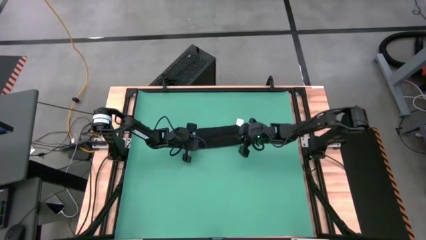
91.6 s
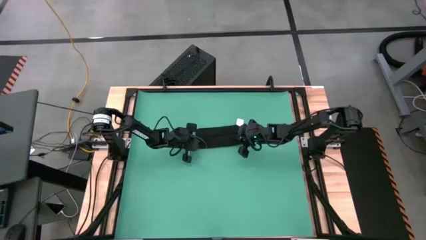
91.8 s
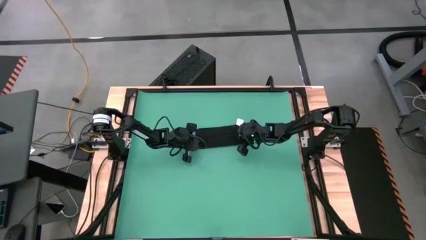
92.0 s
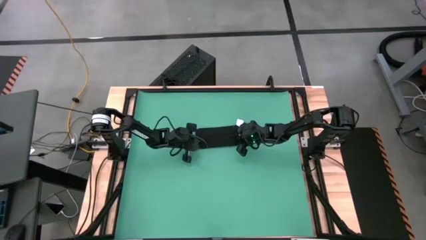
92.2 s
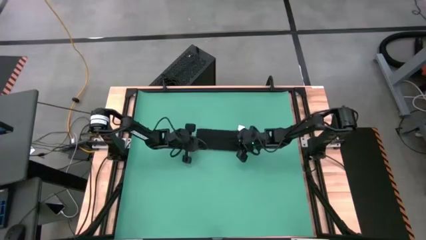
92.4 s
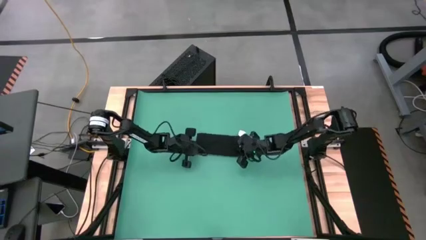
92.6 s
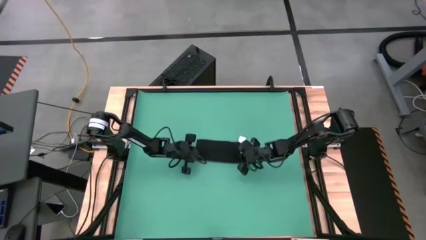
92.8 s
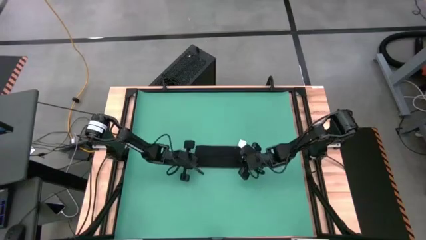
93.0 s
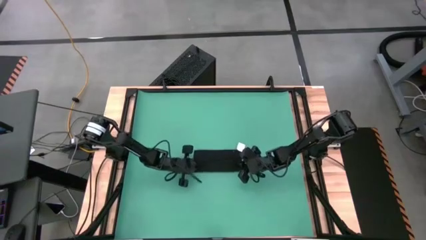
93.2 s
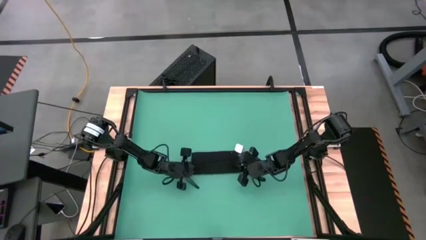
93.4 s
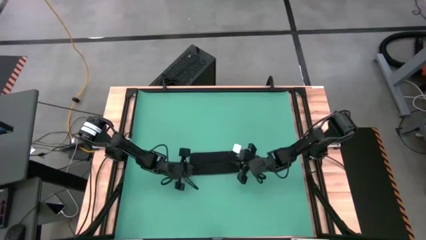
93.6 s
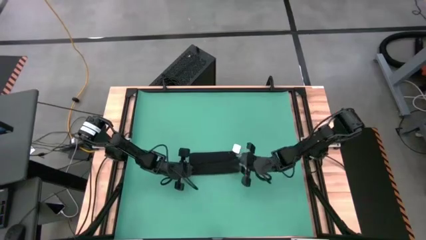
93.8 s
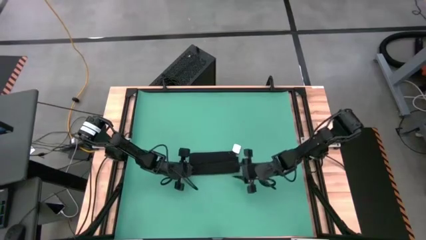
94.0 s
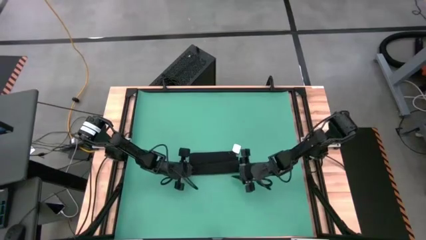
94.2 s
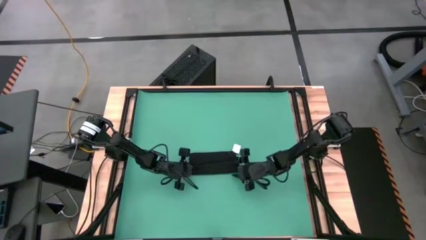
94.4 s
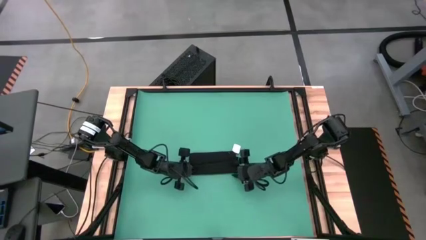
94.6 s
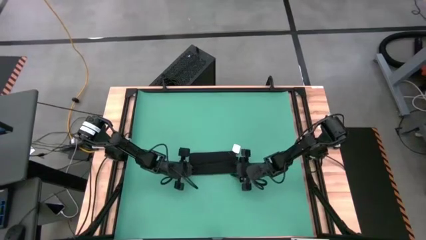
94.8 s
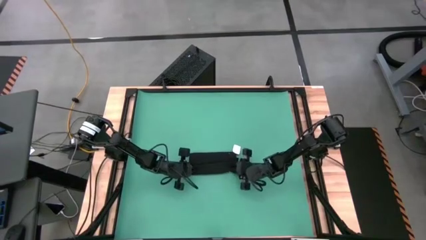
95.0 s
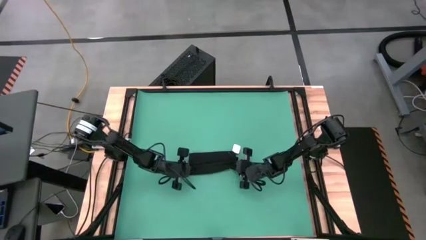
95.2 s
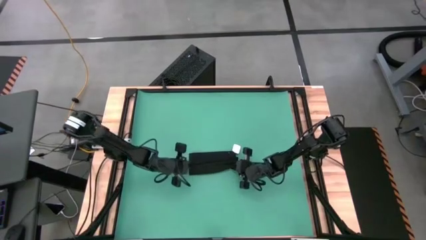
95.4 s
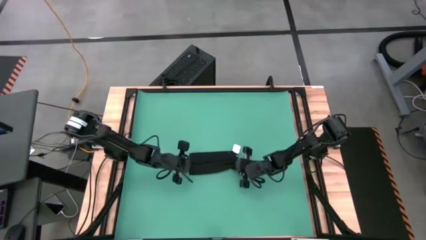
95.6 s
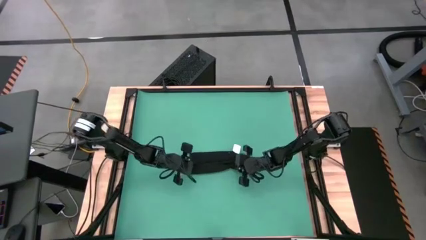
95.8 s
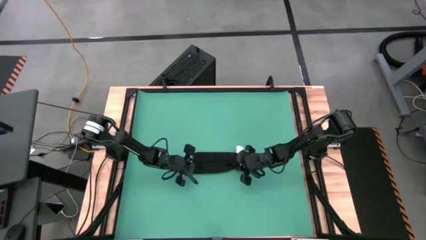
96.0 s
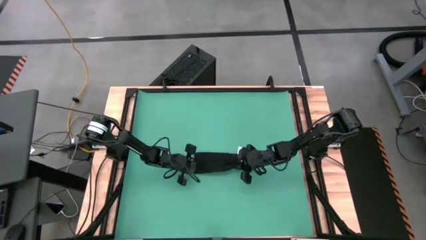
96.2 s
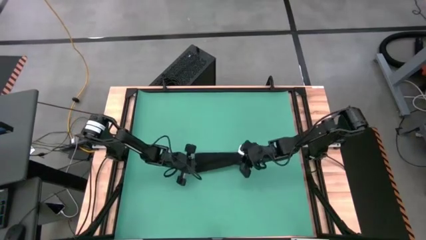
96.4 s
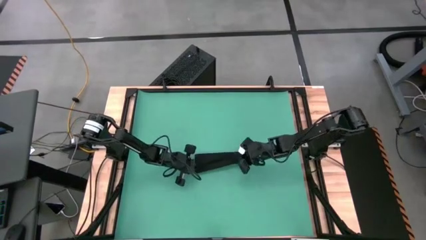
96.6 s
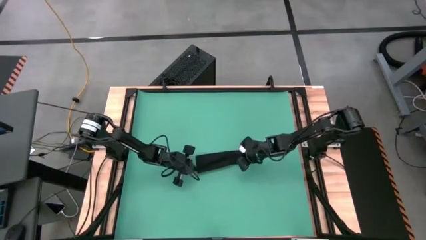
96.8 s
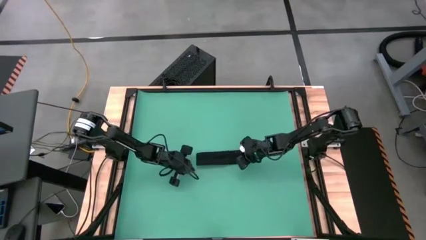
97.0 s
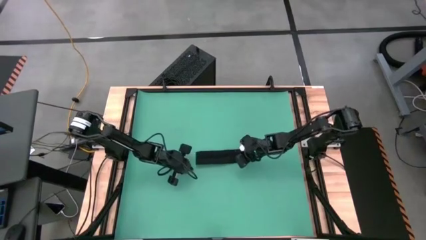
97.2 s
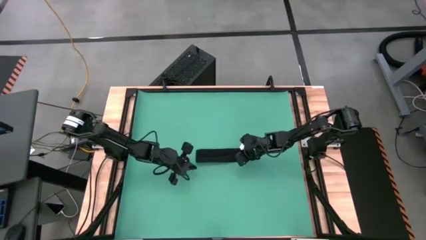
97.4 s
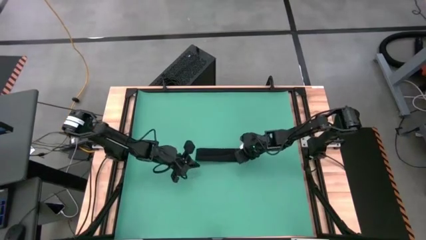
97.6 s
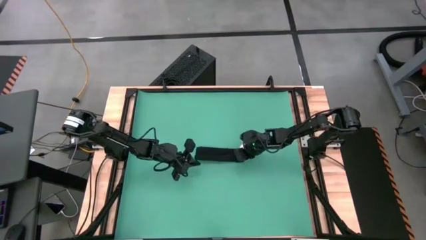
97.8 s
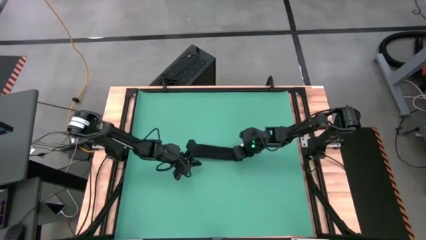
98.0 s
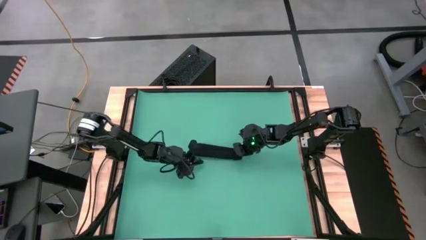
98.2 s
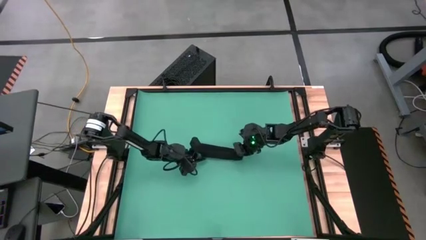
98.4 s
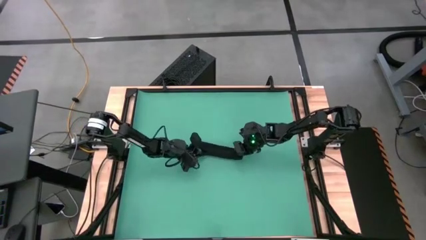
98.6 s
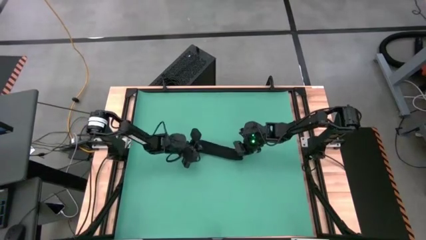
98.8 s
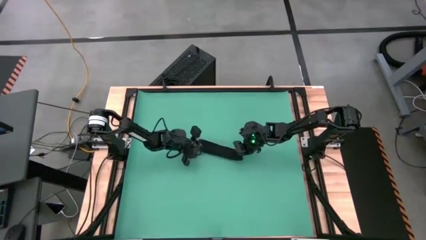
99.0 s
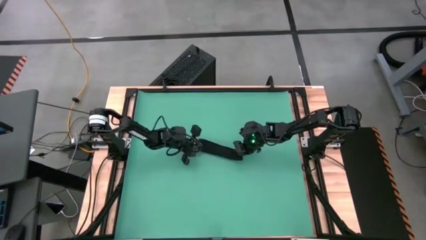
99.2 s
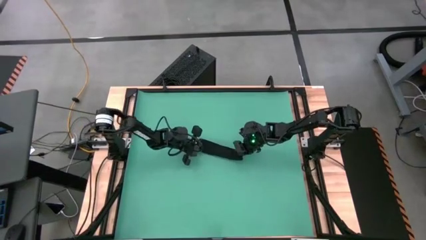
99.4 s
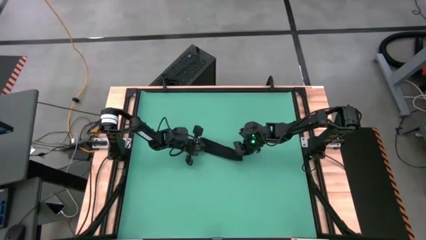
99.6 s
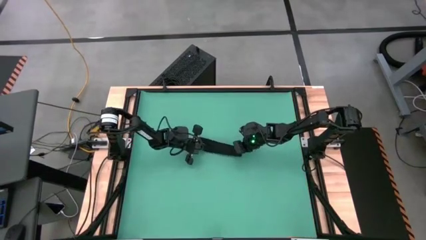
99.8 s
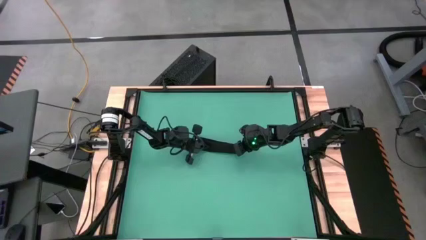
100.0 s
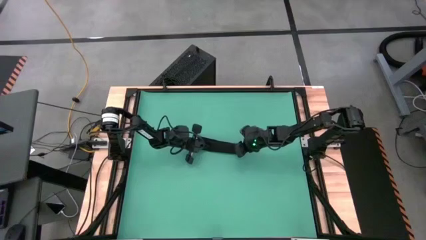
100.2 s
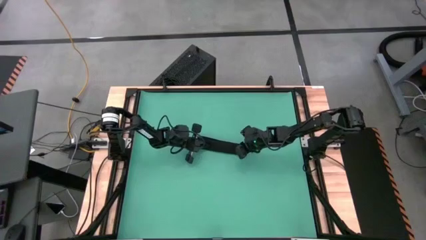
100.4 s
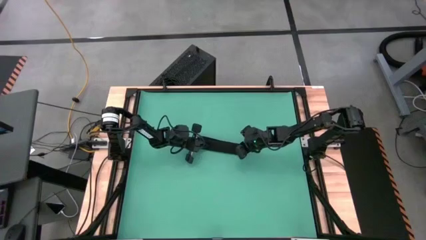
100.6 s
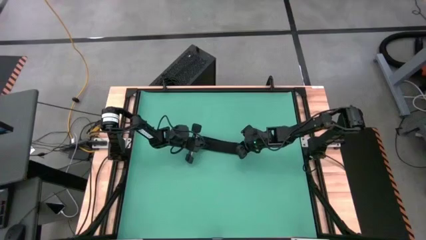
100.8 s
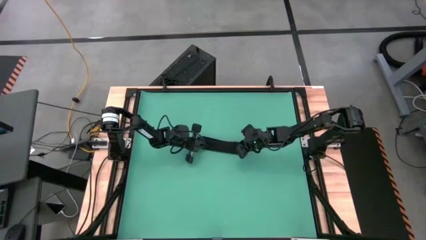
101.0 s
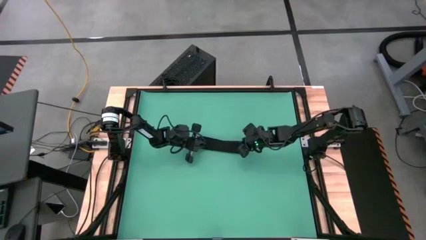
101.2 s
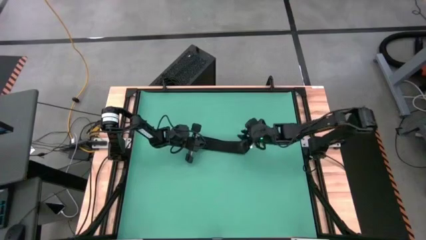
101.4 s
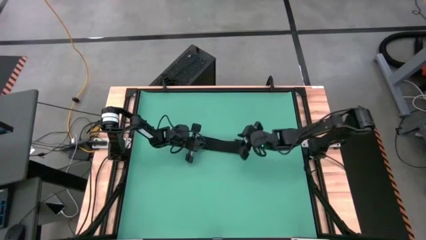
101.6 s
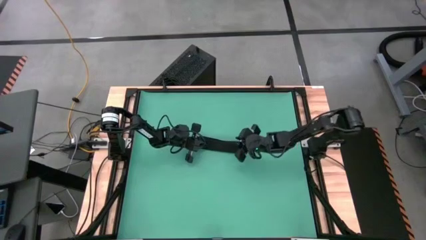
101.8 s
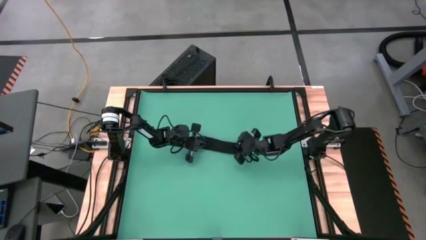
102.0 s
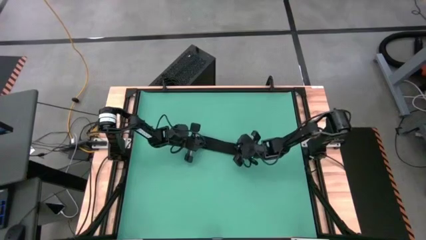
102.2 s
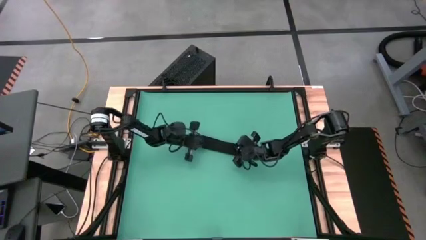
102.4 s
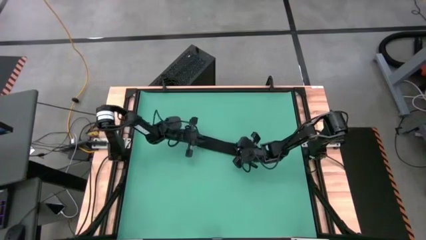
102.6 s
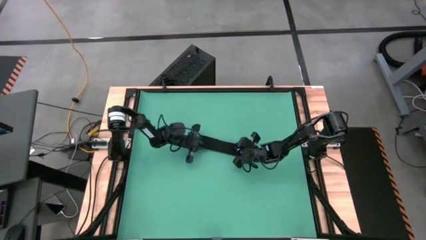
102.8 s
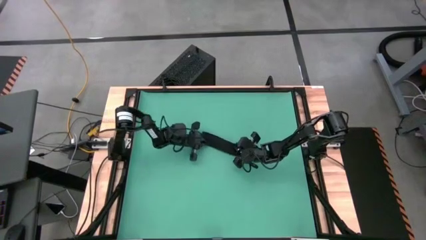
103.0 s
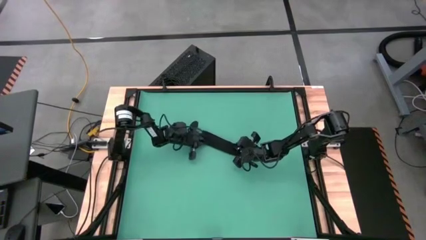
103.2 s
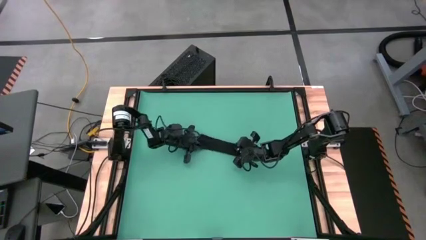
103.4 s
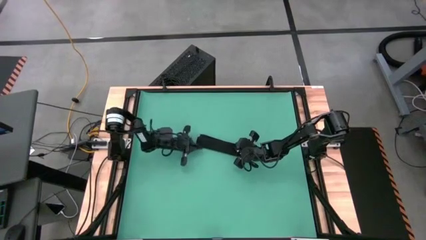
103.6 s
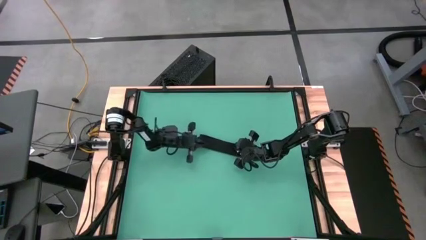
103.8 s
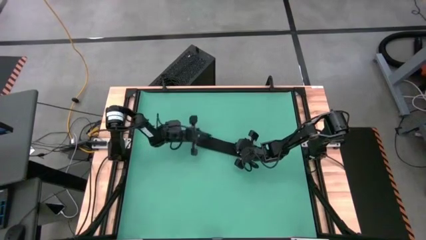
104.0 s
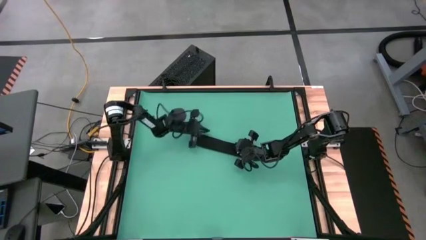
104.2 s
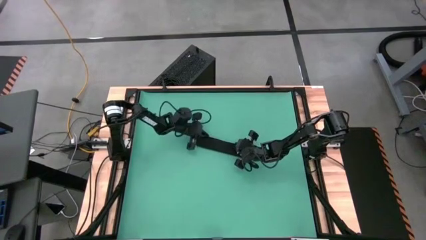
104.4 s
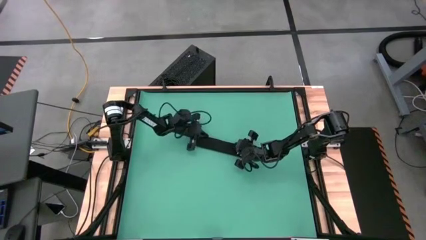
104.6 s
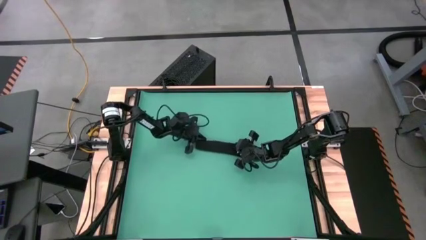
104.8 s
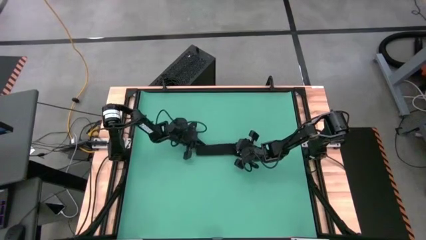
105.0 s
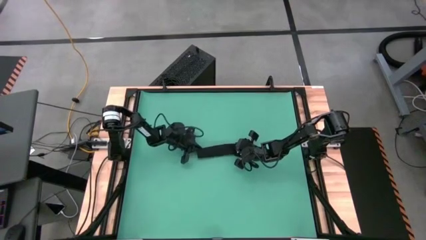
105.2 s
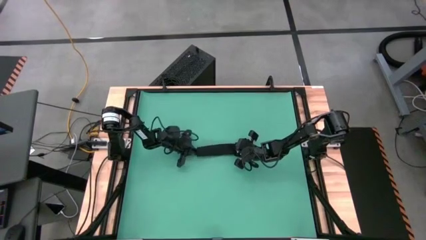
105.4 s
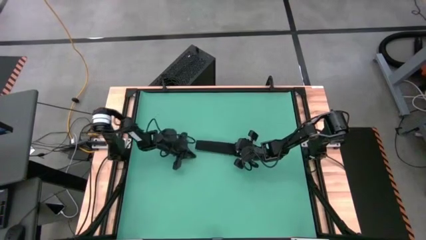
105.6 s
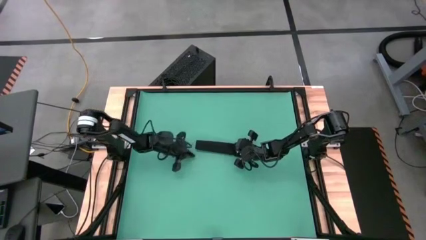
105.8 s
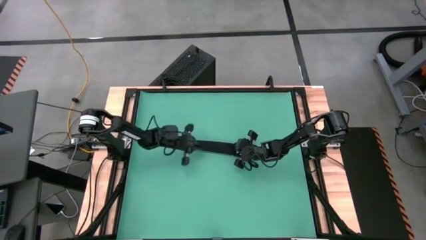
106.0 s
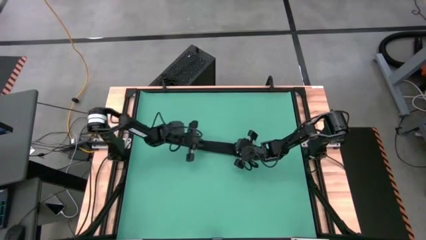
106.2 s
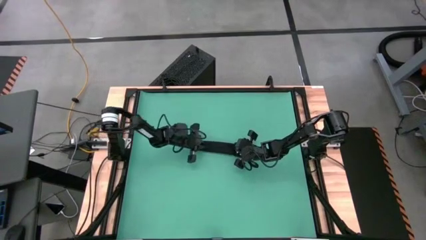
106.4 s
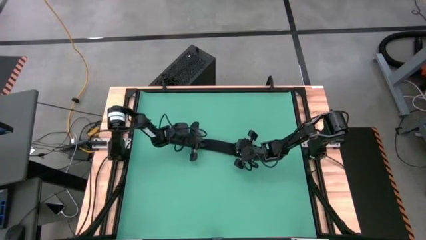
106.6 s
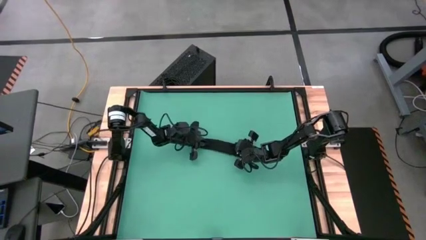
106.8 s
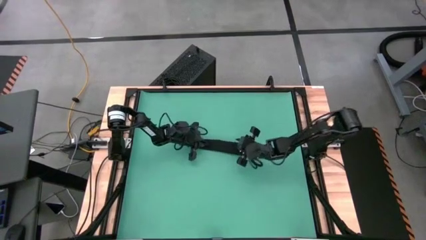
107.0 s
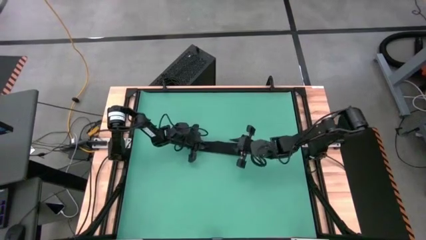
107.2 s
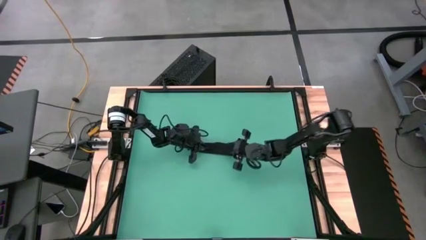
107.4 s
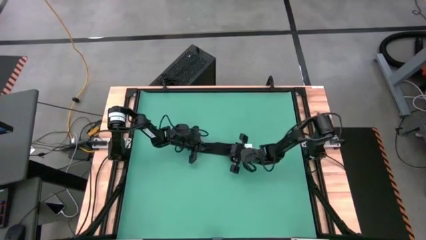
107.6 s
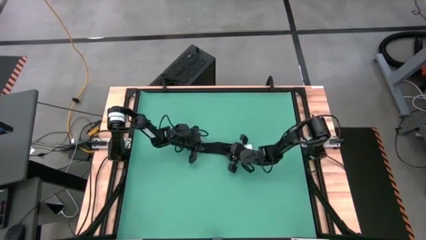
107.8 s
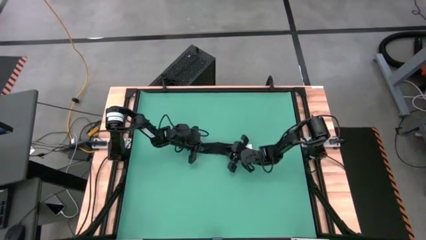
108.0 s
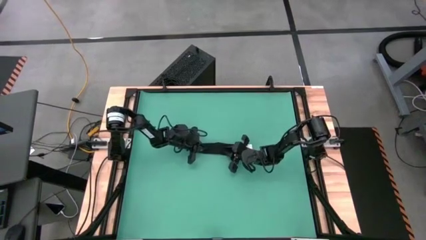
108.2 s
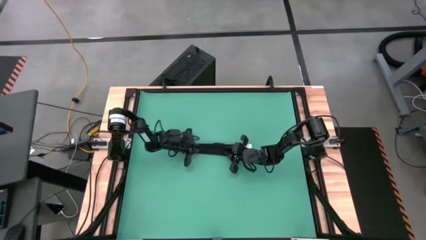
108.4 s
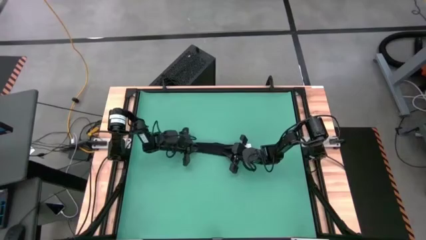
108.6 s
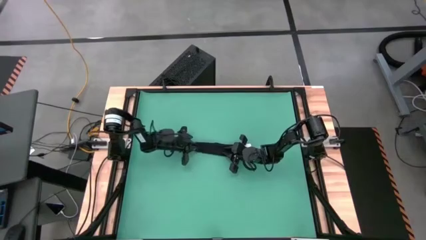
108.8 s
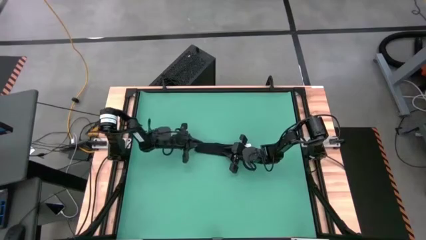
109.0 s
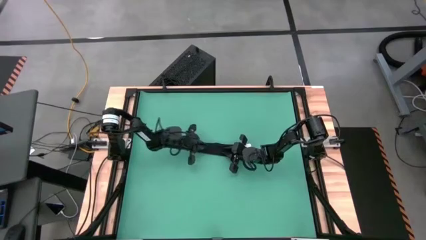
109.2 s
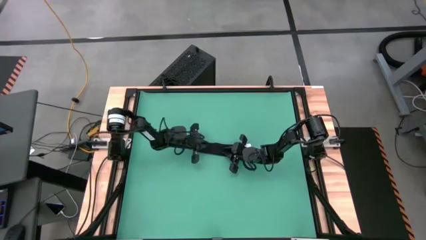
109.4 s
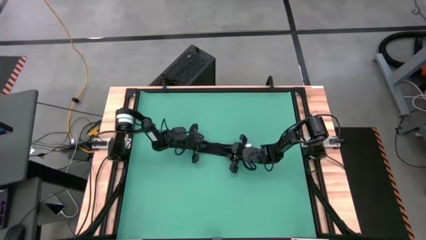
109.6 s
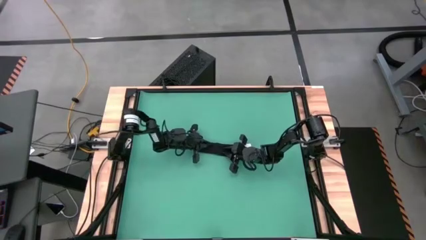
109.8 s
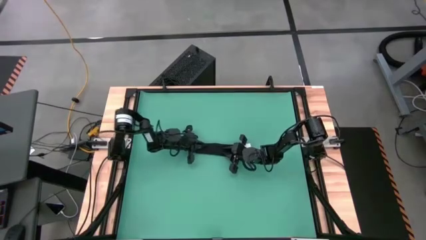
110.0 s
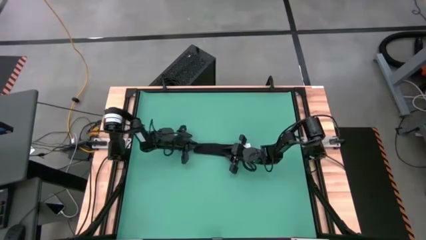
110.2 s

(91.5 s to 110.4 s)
Task: Roll towel
Roll the black towel
